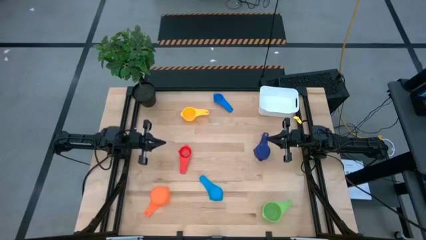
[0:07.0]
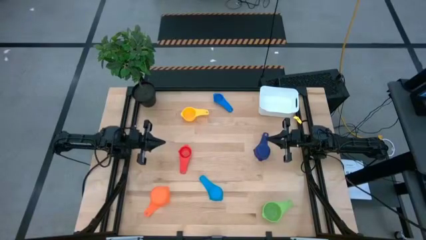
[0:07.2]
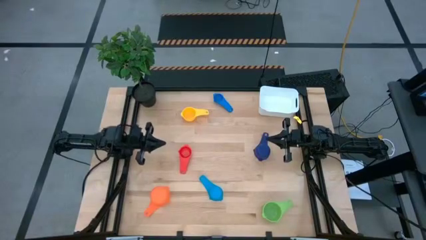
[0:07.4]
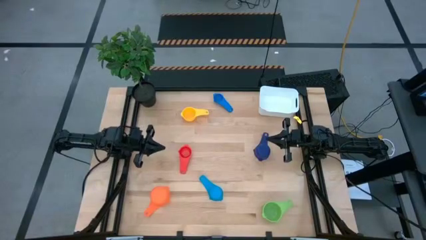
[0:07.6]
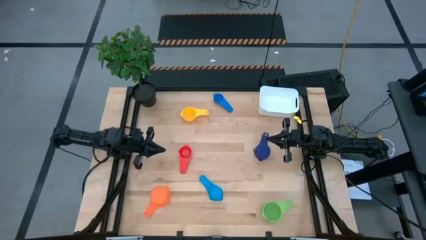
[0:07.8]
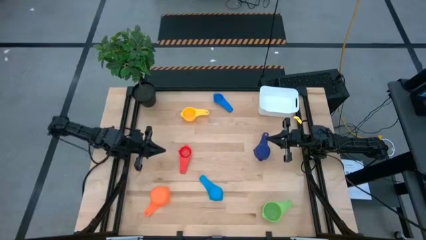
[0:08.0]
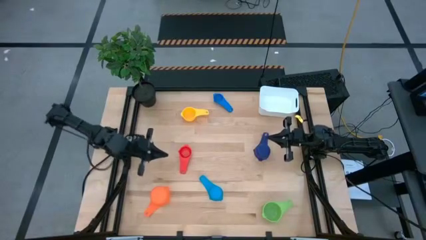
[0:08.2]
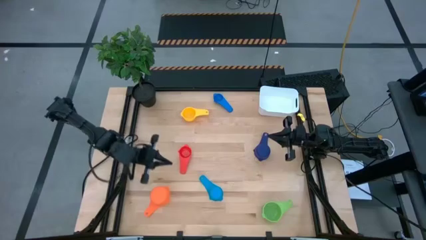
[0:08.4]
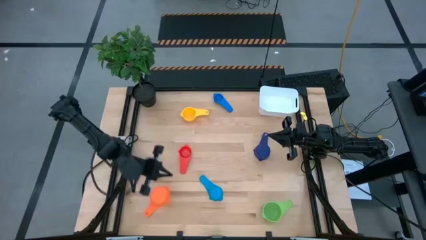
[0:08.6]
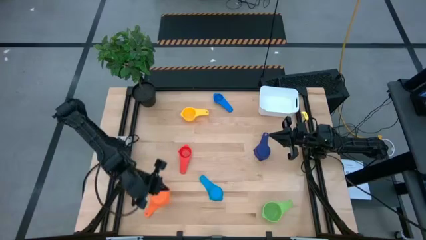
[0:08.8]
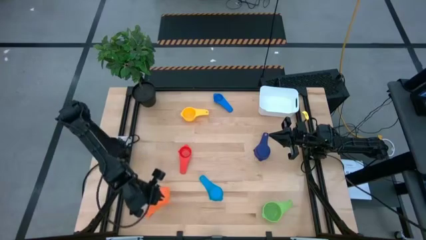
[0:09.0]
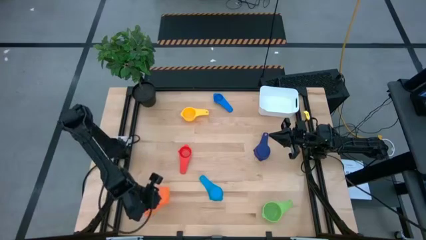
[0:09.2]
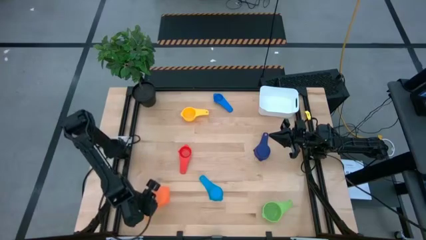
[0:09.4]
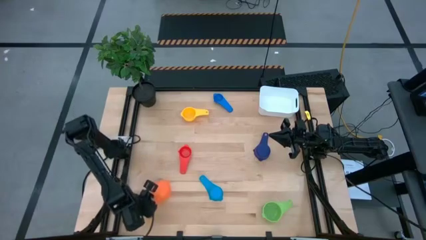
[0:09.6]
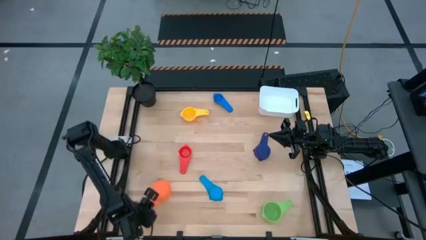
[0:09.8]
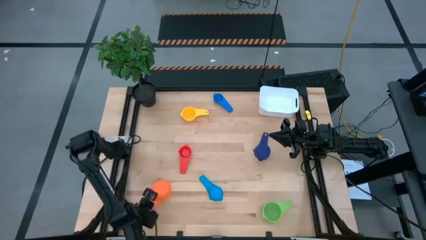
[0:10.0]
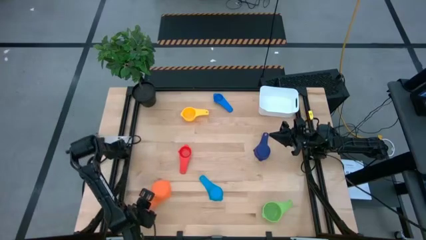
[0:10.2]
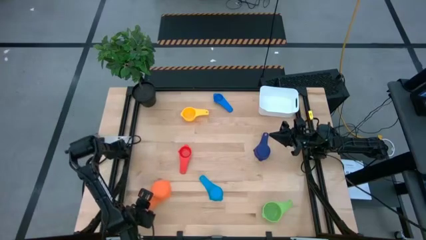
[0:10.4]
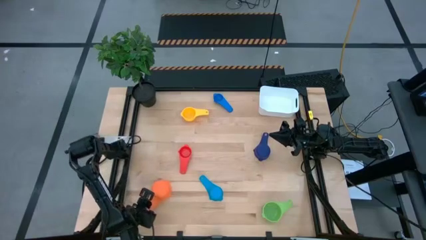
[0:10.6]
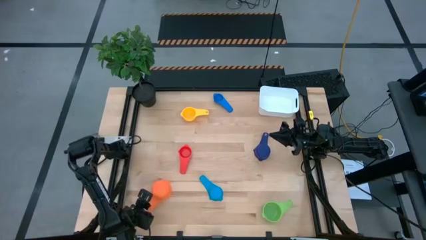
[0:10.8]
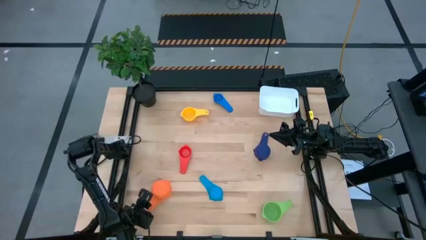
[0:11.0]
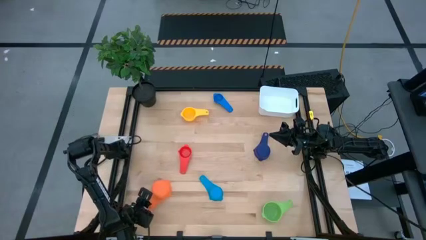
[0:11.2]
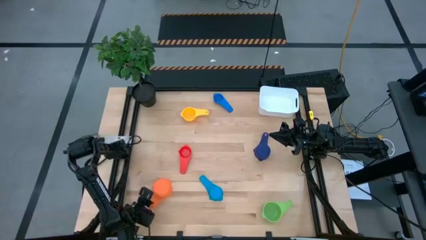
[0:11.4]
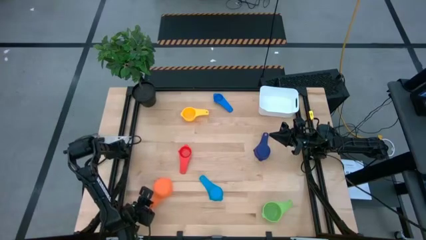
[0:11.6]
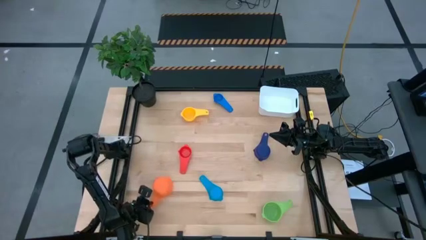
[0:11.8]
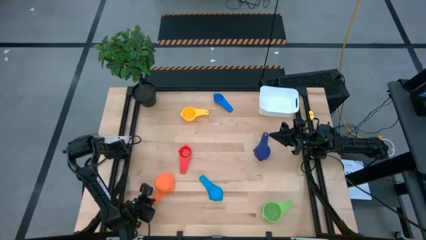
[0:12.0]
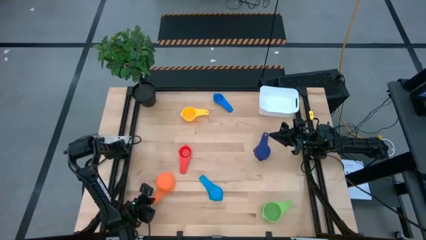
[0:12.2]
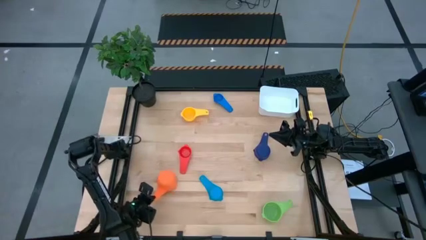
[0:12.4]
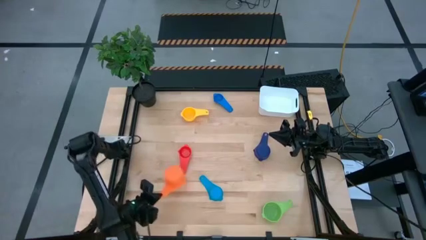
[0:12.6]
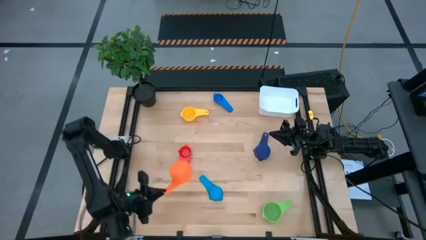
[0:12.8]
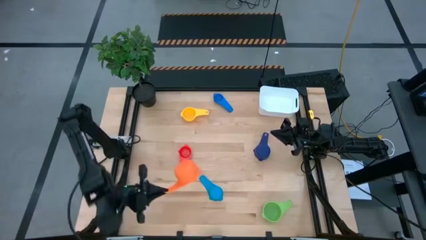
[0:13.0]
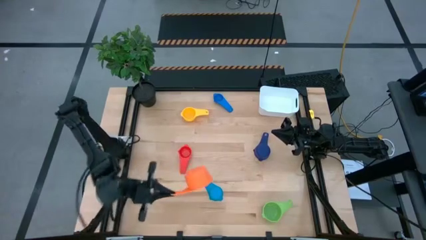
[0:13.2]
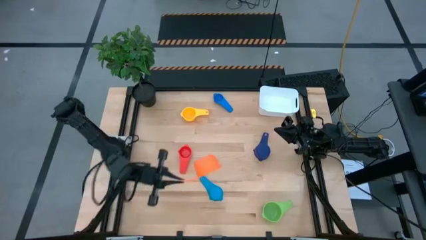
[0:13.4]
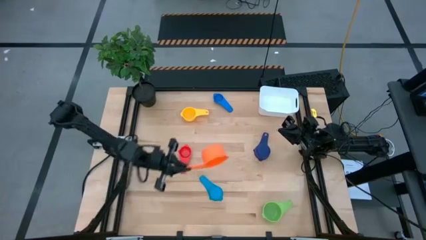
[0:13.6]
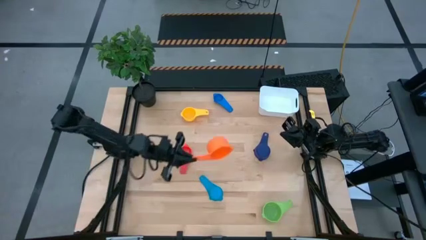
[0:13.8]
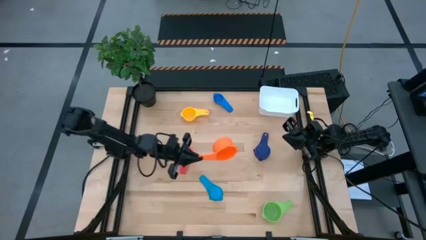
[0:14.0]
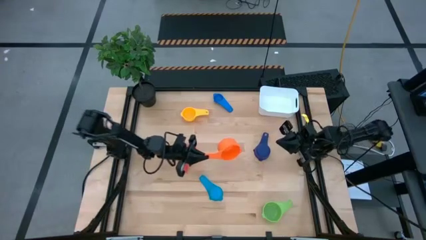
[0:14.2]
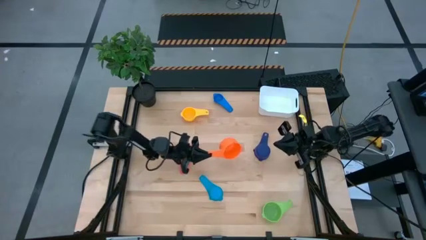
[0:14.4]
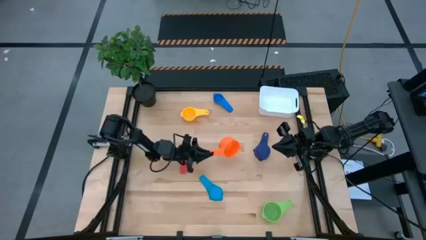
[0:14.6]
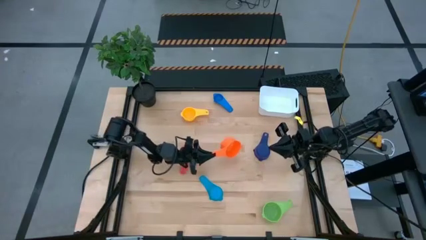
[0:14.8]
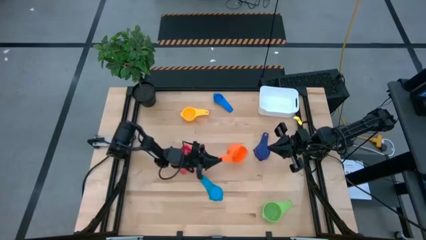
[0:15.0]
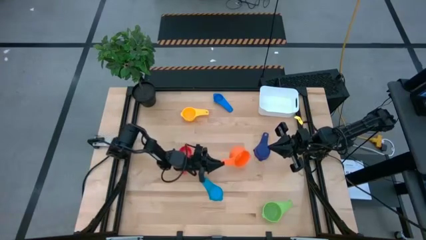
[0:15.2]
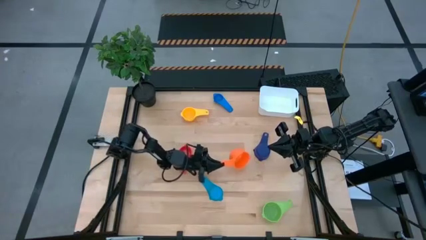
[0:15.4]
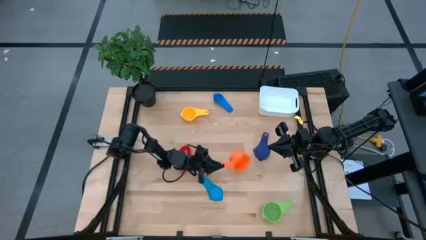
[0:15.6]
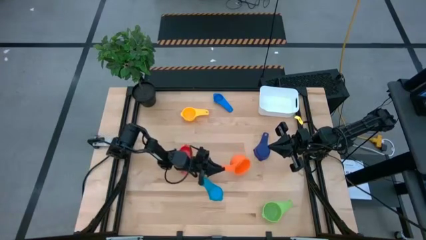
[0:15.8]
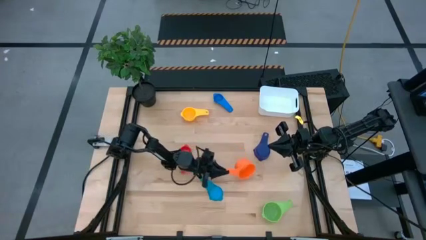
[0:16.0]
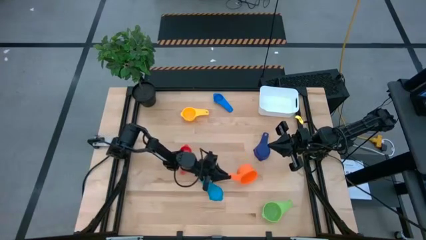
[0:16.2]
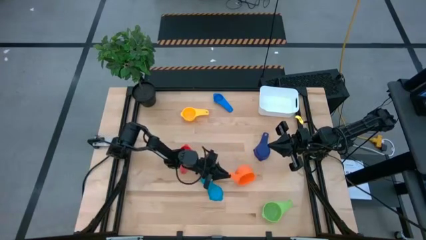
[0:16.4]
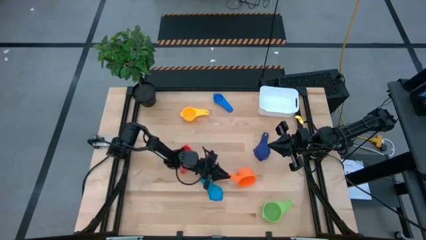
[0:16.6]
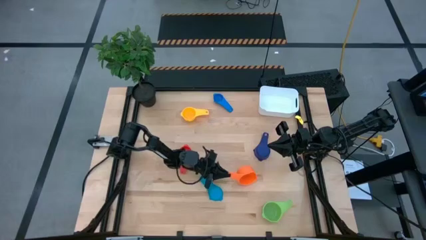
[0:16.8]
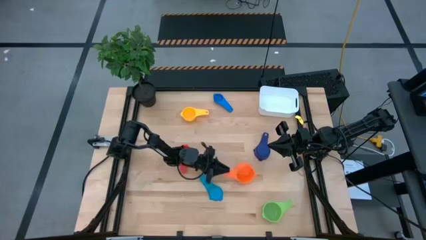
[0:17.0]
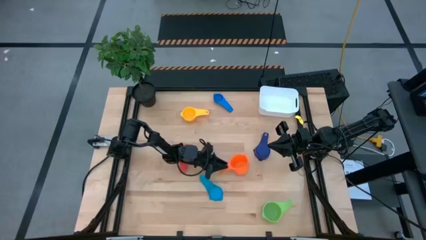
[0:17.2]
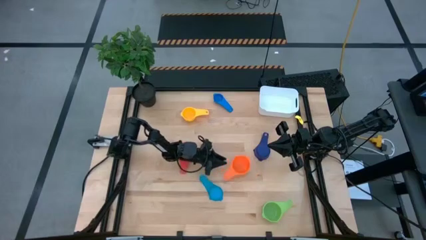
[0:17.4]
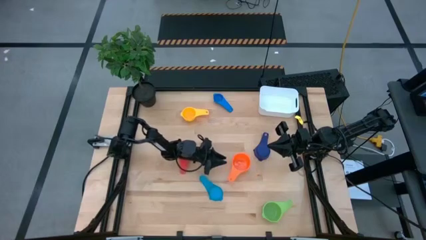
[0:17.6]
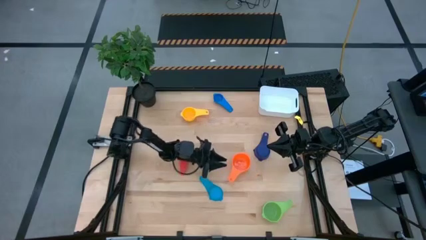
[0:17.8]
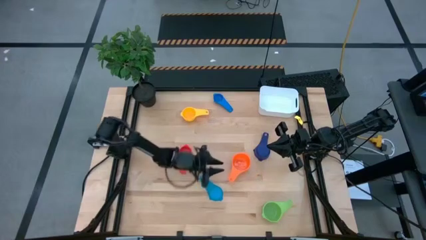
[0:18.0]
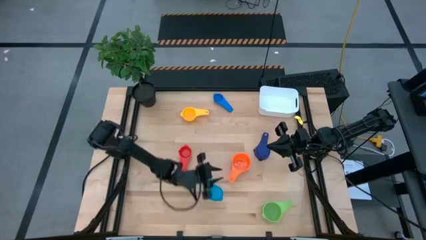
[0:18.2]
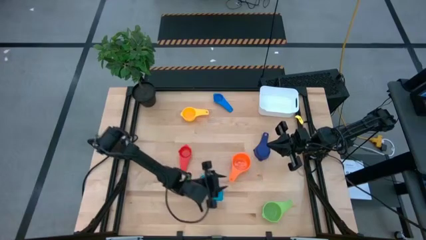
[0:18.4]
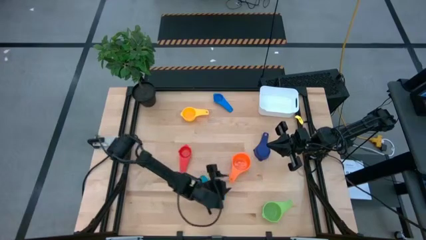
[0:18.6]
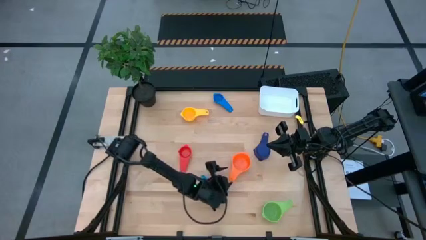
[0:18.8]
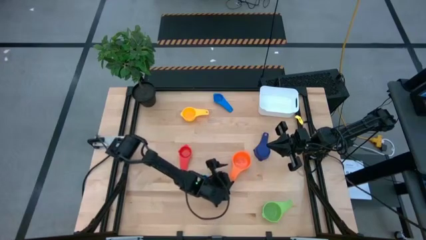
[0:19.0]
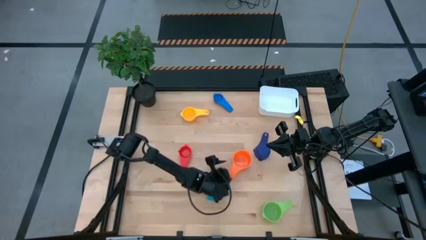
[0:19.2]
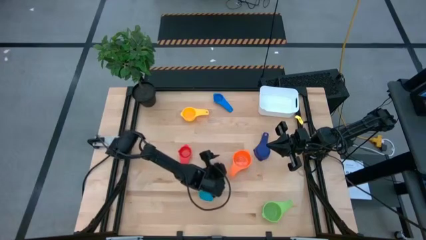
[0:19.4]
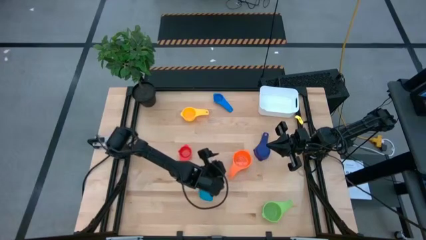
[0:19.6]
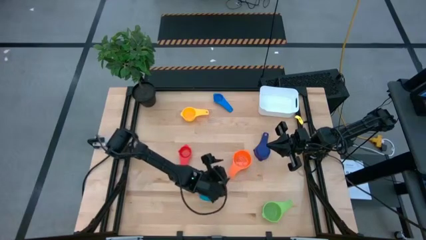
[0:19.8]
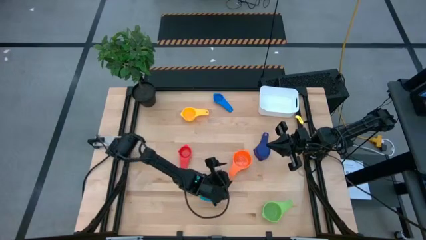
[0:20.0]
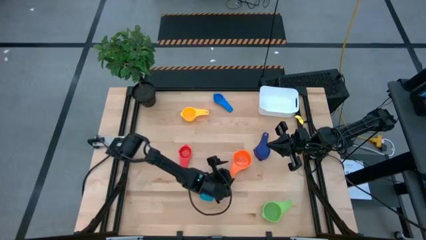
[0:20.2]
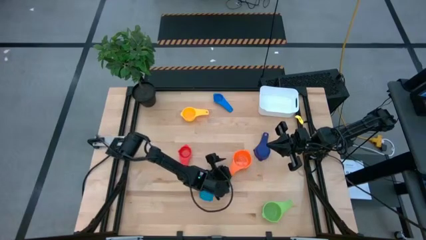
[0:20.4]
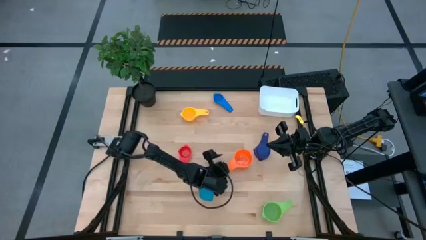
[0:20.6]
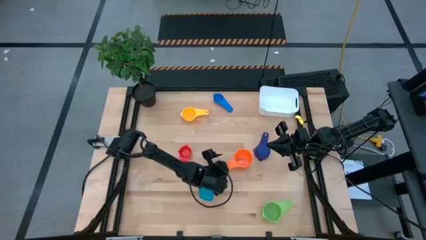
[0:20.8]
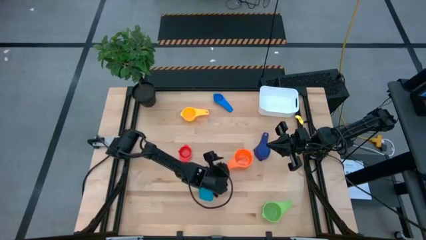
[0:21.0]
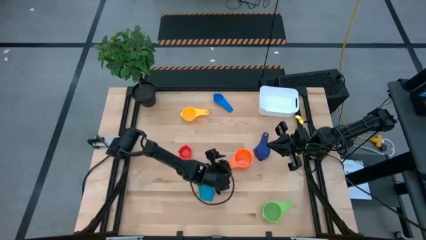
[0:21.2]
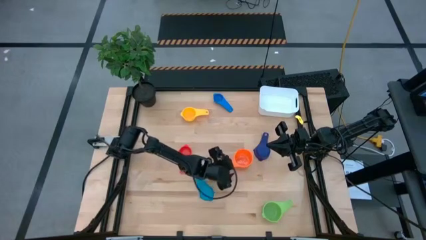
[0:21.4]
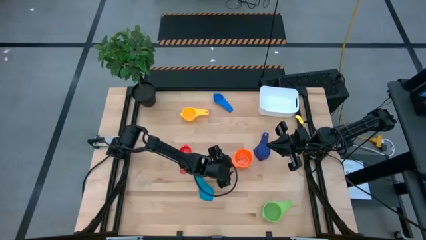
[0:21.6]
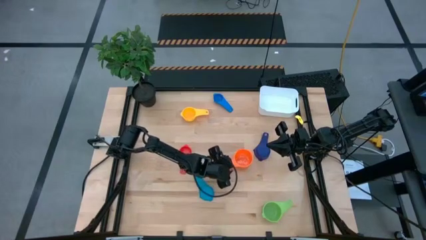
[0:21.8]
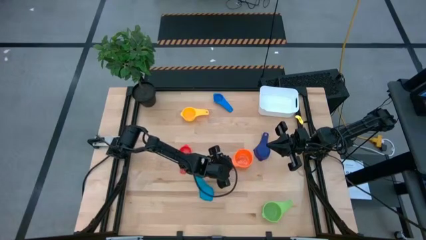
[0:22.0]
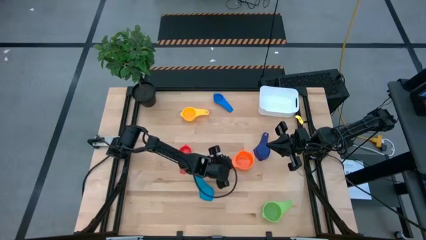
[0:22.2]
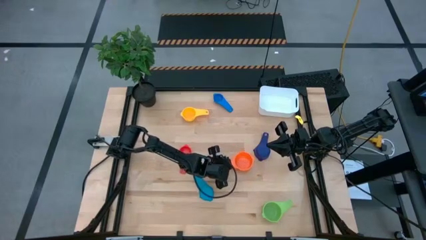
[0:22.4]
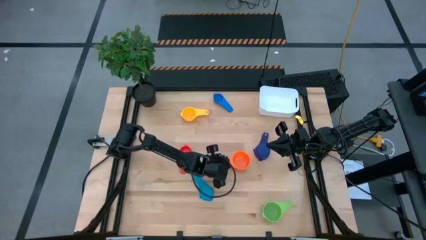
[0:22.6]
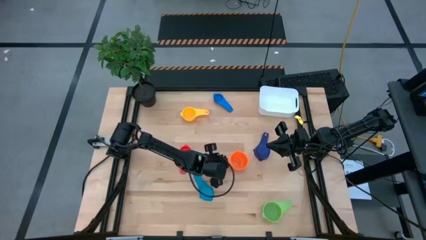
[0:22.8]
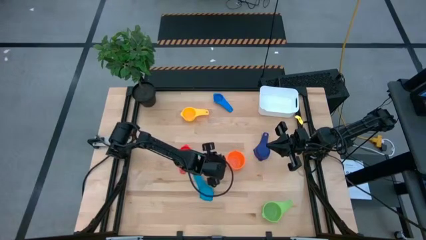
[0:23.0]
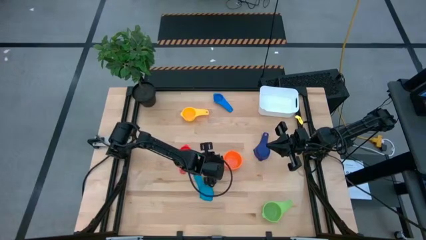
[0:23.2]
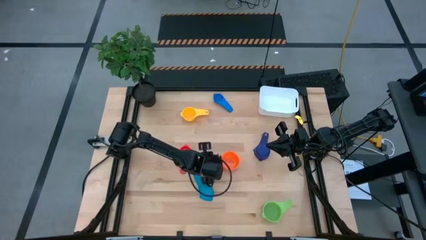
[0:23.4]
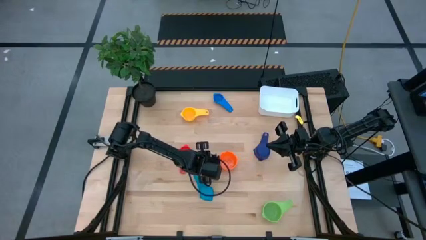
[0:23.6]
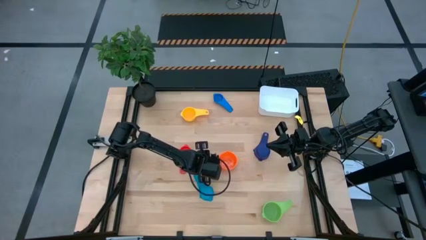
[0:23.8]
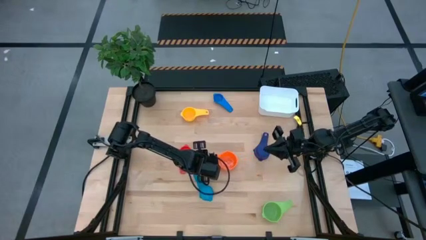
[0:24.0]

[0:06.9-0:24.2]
Task: Nest measuring cups in basket
Move the orange measuring cup to the center of the table
